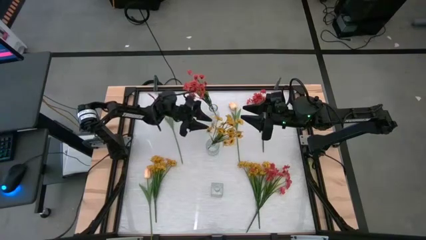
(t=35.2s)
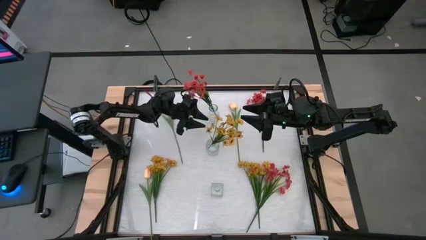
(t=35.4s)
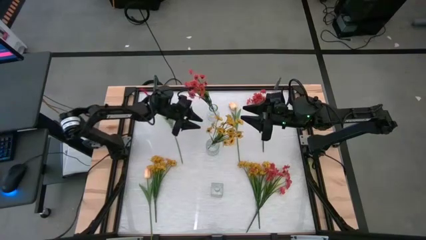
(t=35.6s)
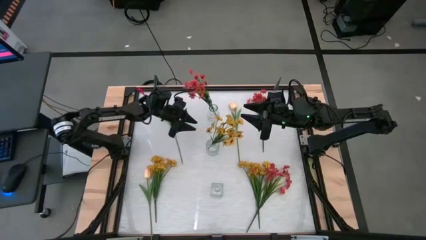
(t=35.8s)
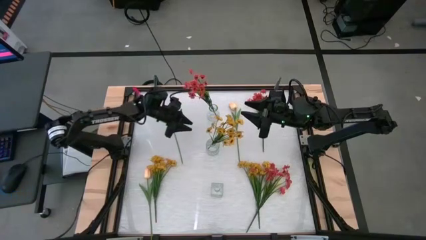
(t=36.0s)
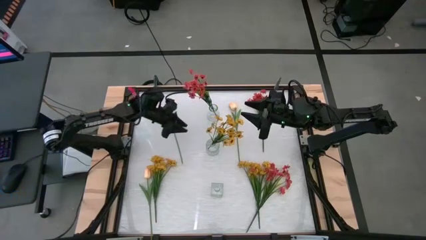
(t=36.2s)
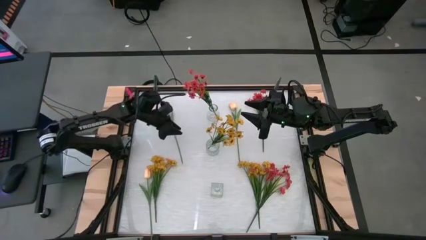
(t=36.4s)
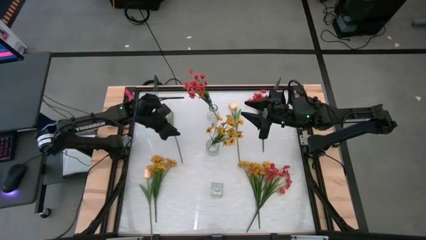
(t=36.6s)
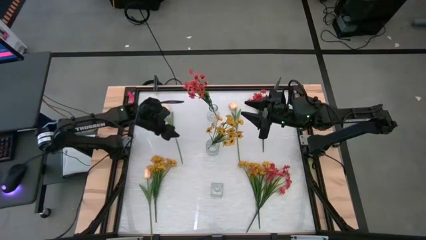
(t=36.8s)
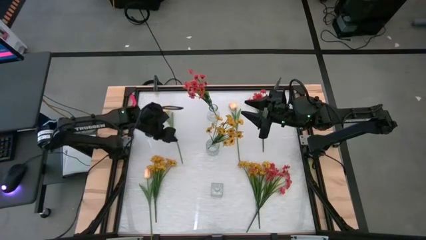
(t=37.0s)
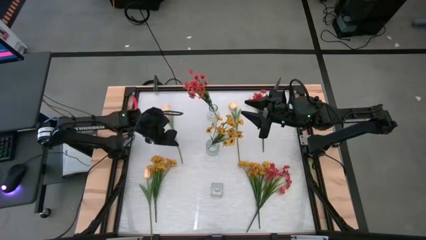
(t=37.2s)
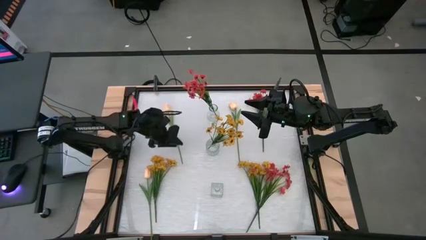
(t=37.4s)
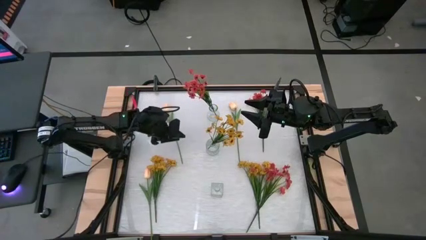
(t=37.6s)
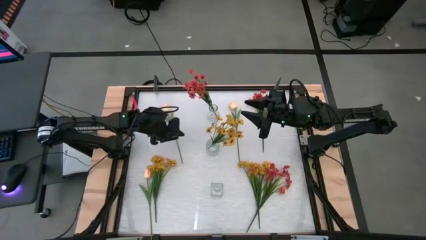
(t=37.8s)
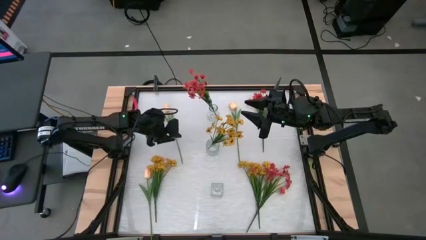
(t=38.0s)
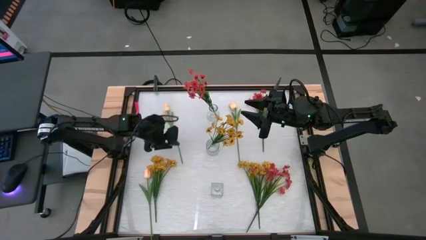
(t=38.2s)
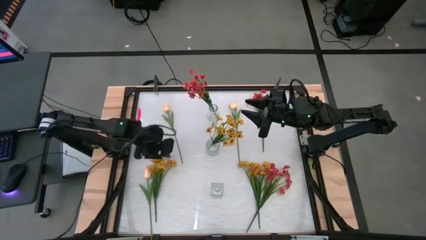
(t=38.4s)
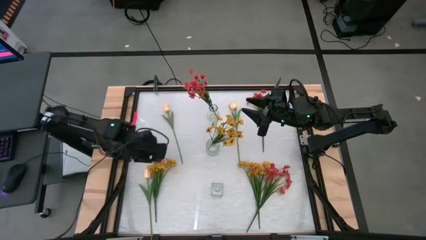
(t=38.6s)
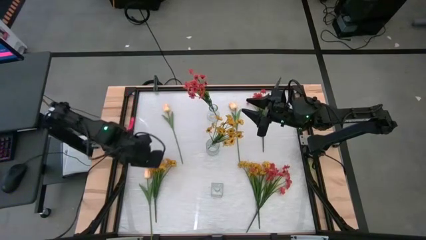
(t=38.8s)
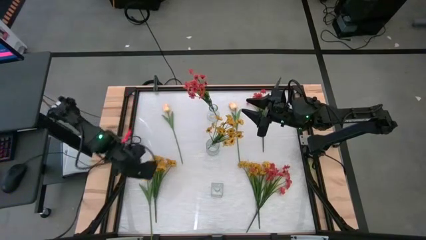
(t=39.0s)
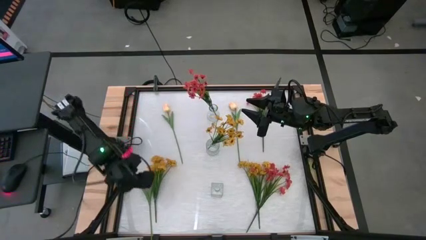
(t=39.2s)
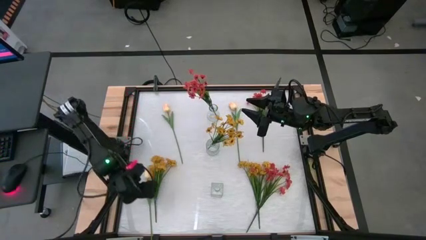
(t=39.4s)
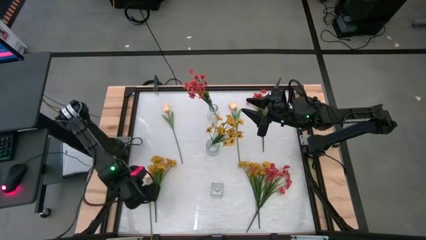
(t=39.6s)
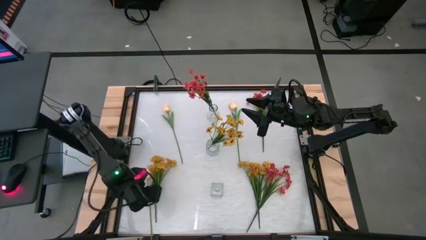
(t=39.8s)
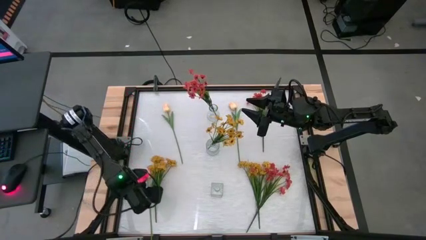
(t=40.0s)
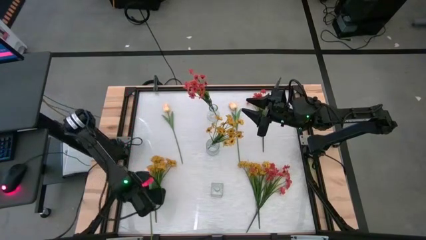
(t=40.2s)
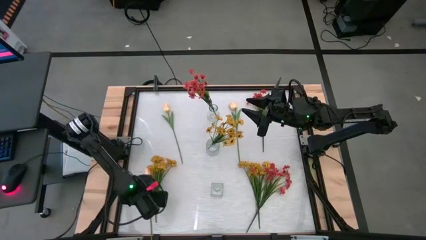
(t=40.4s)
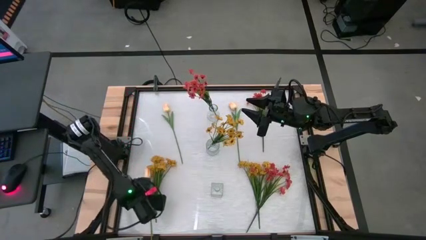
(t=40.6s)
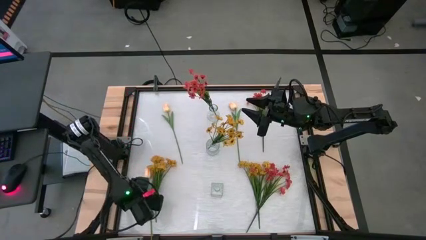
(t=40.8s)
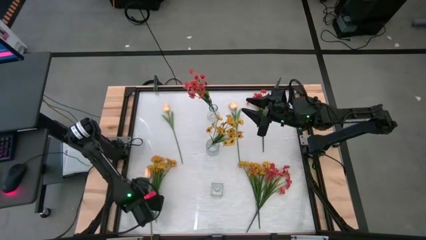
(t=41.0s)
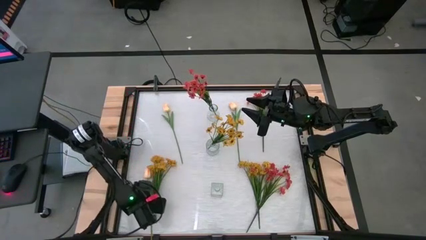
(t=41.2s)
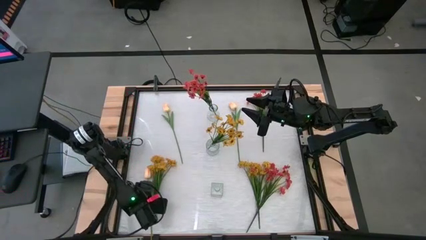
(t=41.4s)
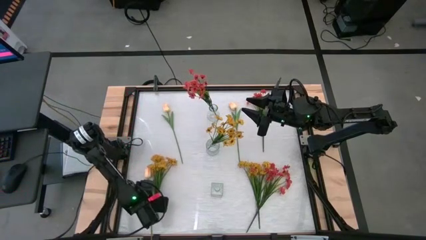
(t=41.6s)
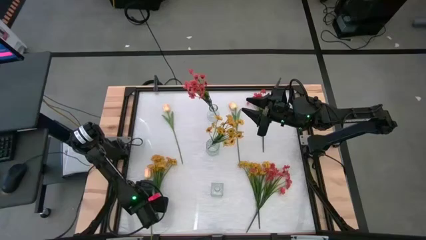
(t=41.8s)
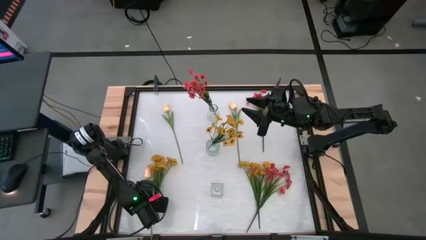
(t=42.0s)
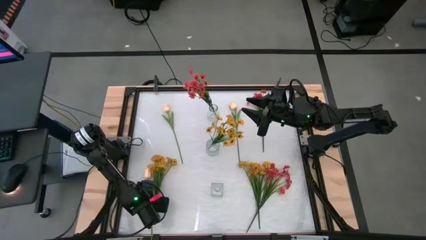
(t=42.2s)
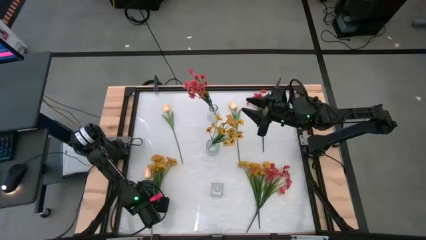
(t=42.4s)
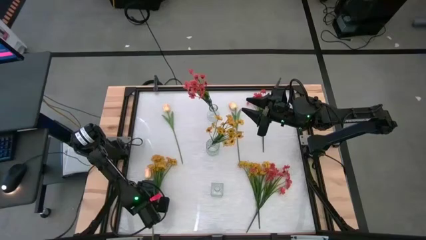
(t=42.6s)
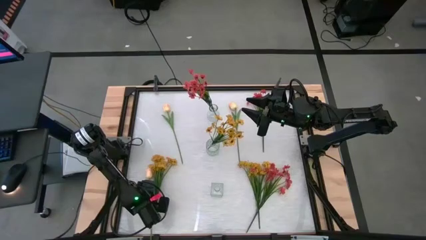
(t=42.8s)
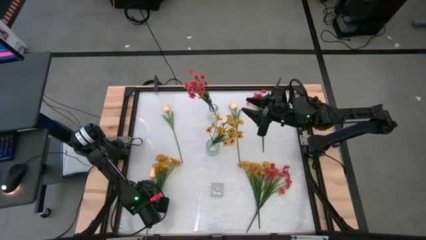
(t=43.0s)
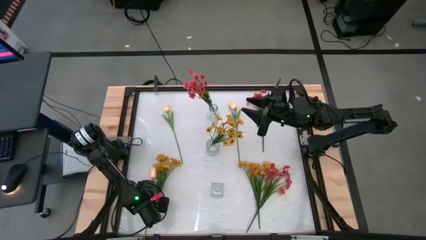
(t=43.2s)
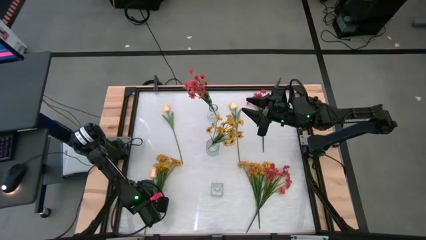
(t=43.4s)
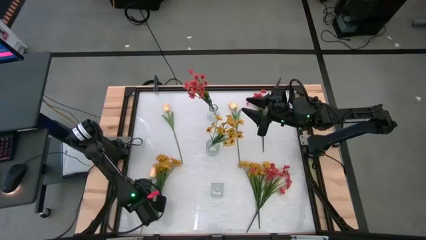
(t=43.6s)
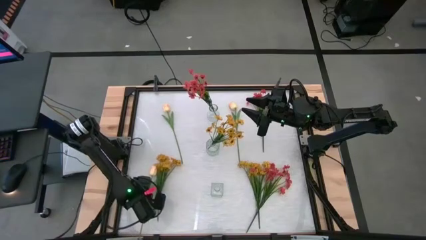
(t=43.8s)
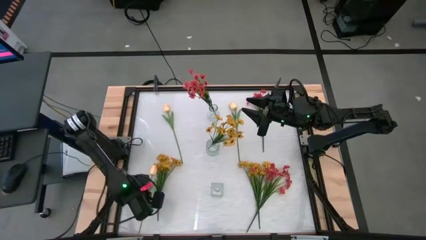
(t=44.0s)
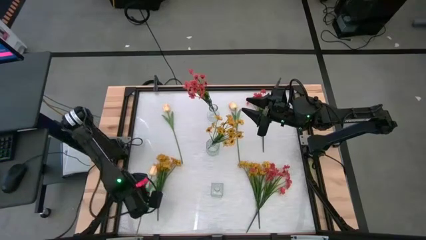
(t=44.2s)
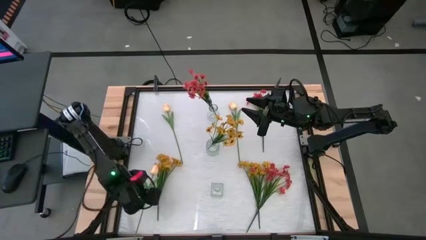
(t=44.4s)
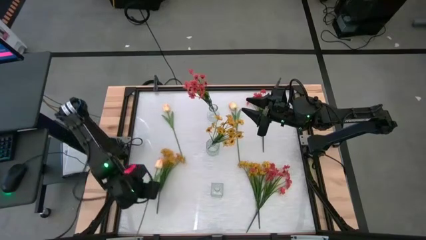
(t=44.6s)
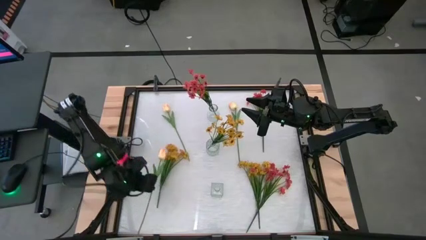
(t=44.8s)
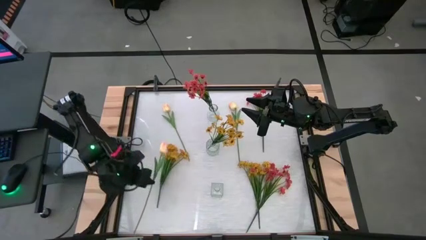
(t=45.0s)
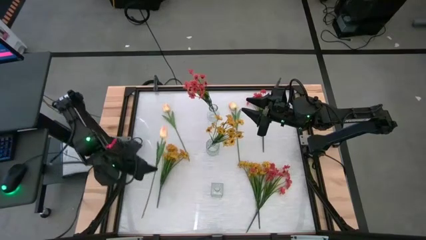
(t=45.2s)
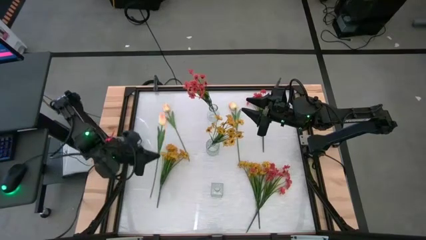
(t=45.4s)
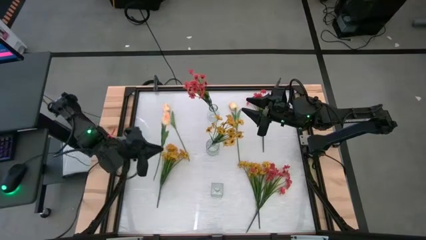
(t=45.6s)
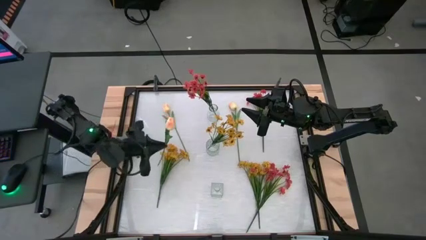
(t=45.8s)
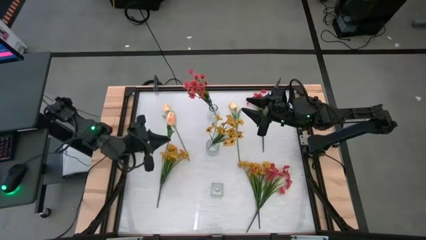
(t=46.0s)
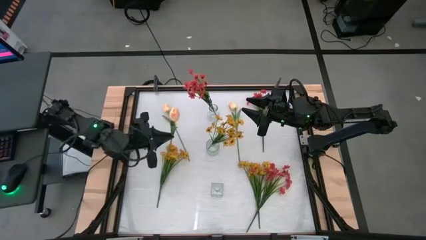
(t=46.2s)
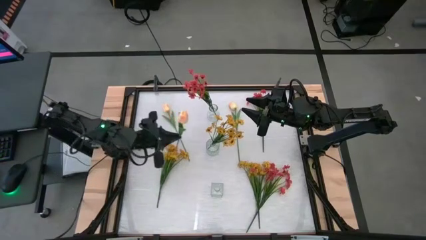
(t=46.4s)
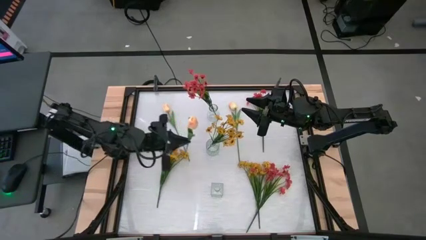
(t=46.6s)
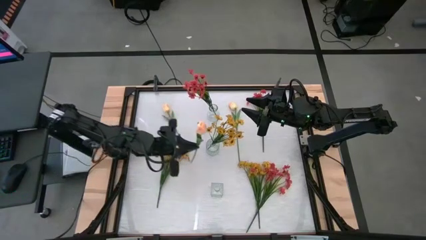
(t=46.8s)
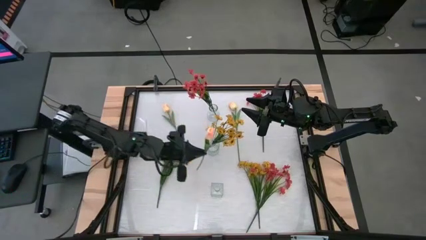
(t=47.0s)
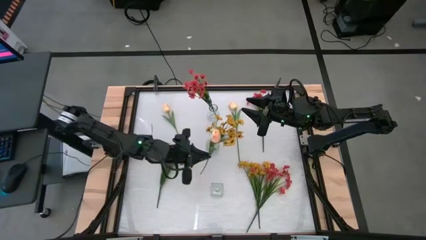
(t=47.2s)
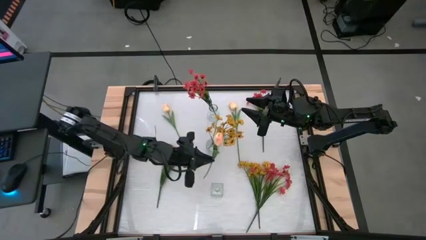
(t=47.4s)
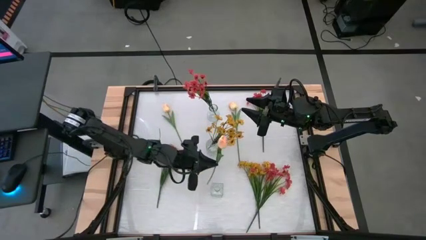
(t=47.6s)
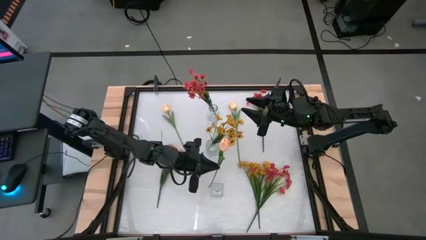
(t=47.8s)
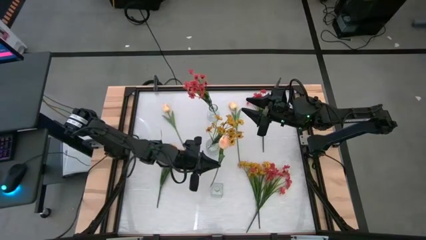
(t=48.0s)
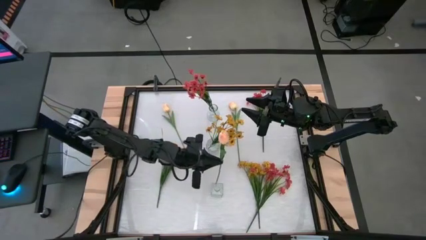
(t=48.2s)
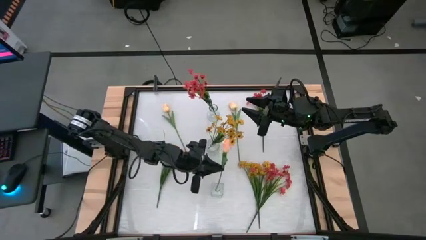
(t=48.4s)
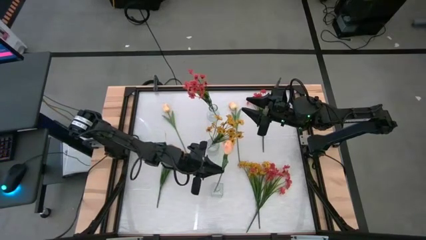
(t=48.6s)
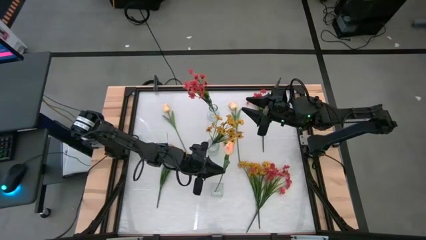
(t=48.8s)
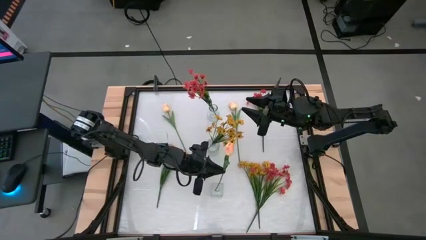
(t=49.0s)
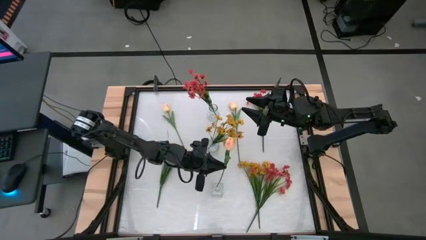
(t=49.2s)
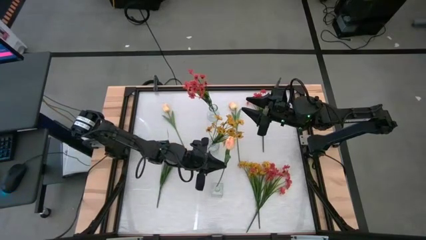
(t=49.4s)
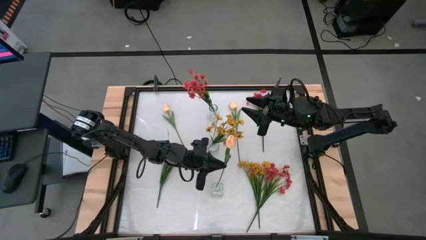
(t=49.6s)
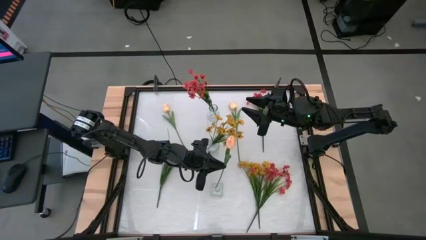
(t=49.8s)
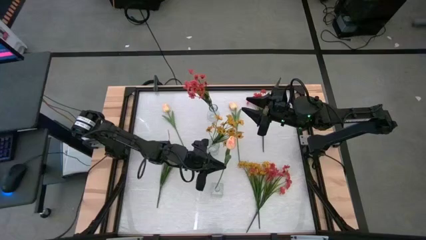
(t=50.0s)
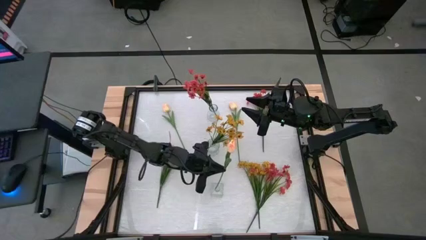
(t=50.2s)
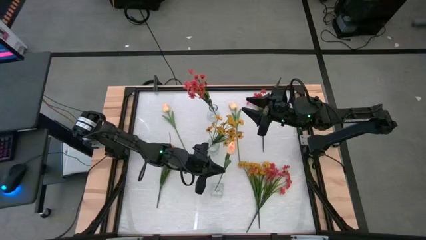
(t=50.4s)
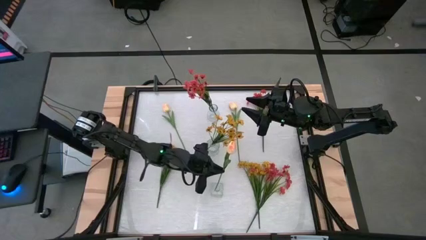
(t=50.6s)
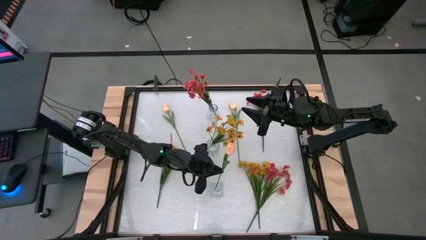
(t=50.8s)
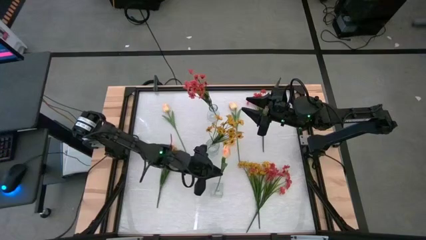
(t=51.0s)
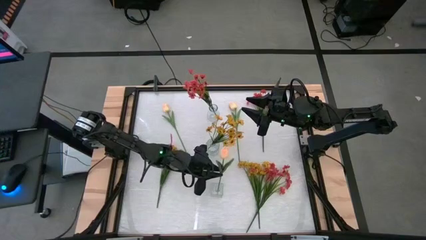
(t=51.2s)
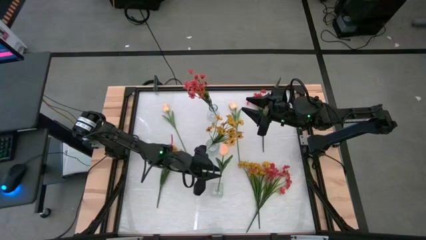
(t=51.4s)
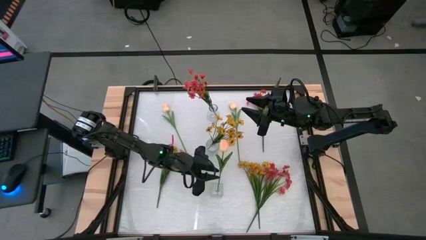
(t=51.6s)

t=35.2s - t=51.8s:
Task: Sort flowers into vase by color
Put the bottom orange flower into the bottom transparent vase
